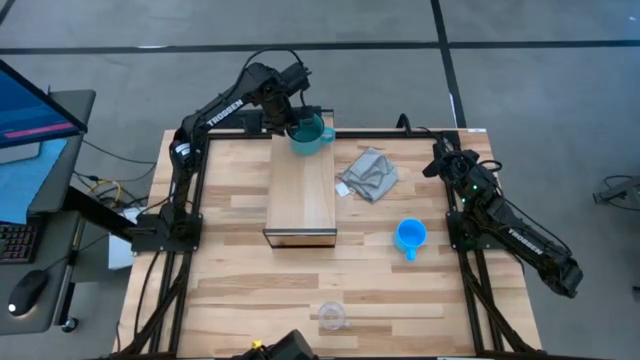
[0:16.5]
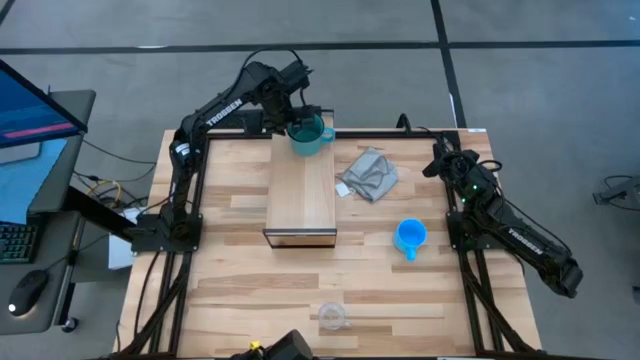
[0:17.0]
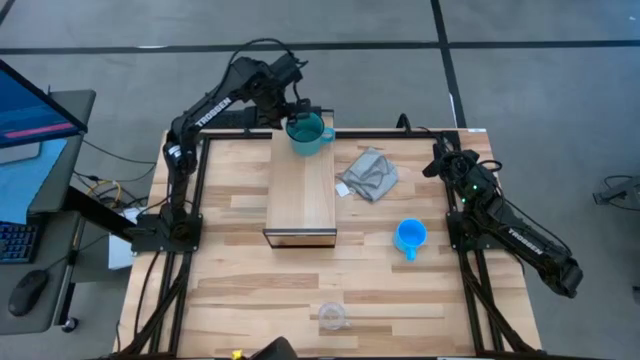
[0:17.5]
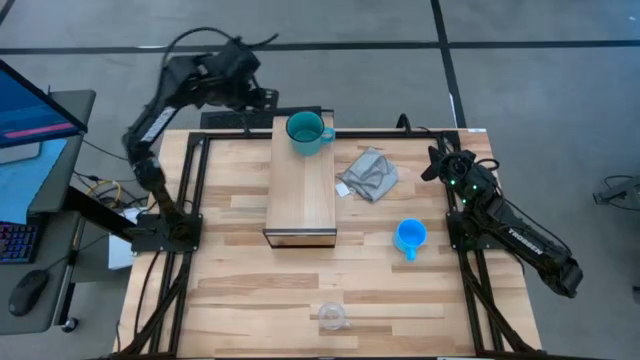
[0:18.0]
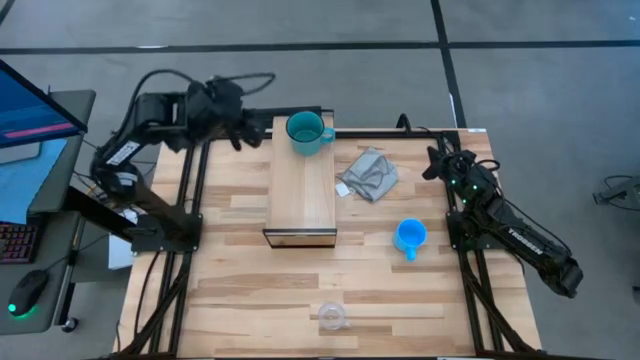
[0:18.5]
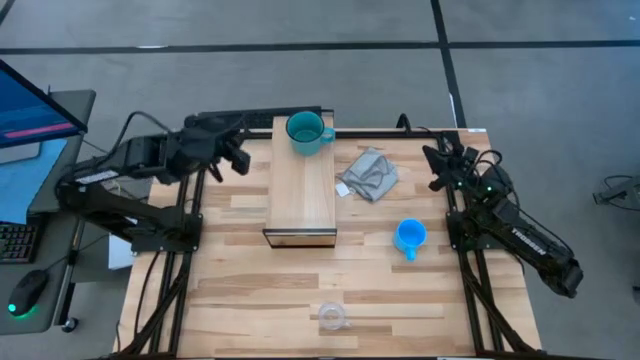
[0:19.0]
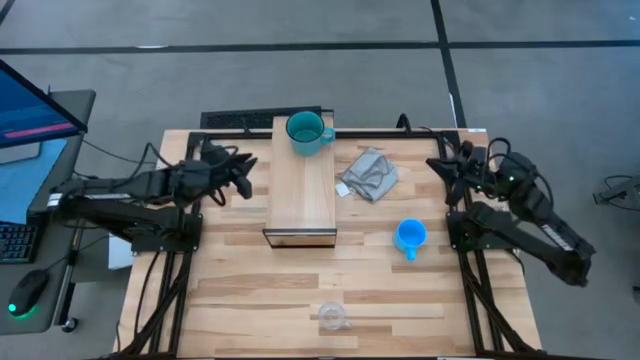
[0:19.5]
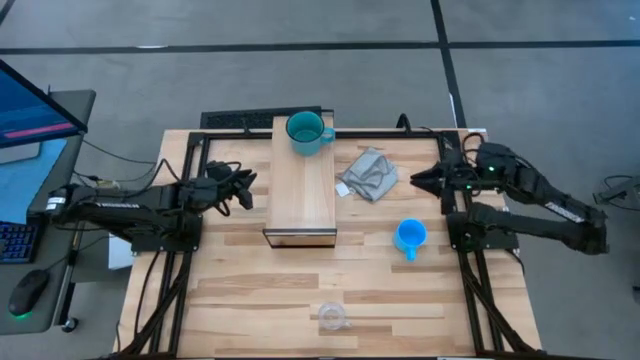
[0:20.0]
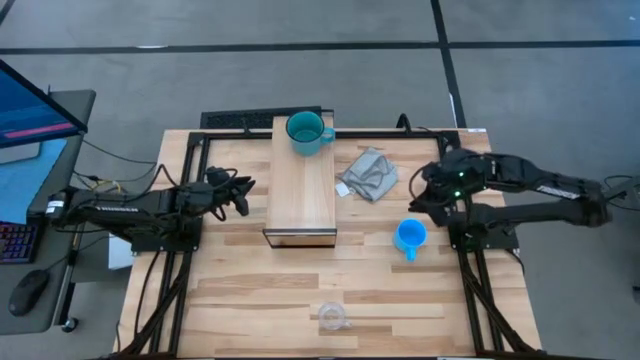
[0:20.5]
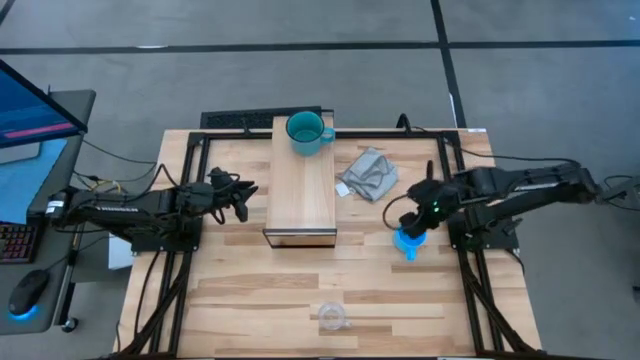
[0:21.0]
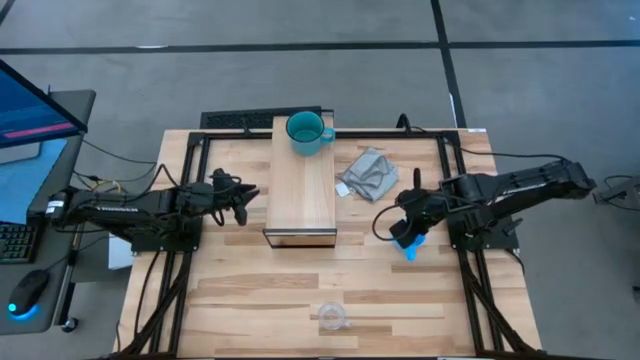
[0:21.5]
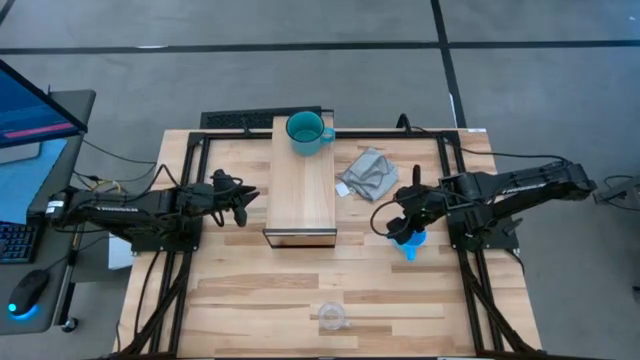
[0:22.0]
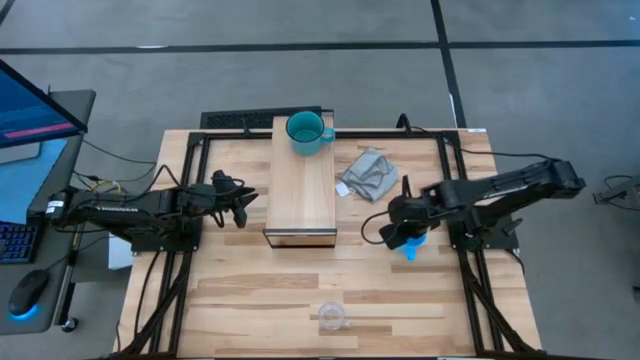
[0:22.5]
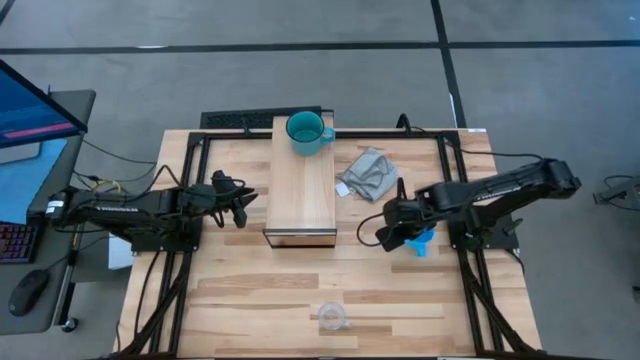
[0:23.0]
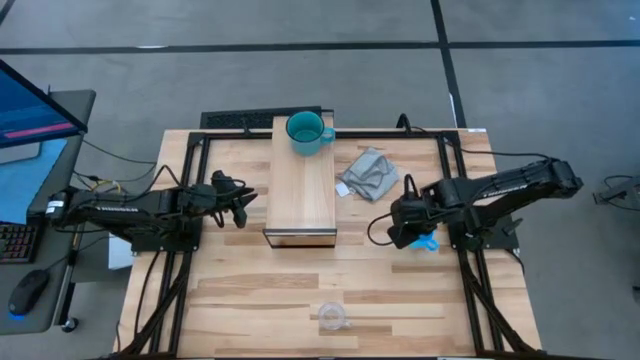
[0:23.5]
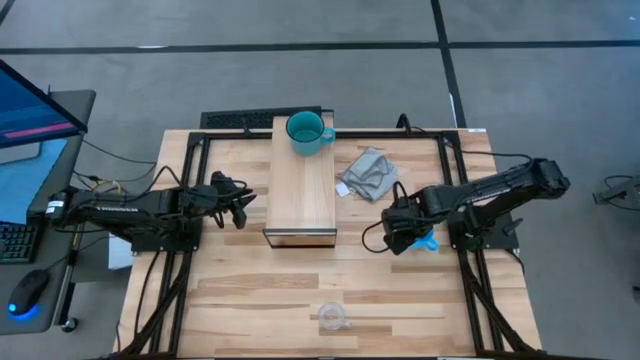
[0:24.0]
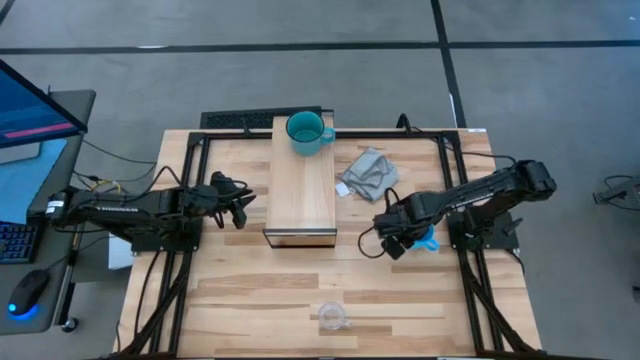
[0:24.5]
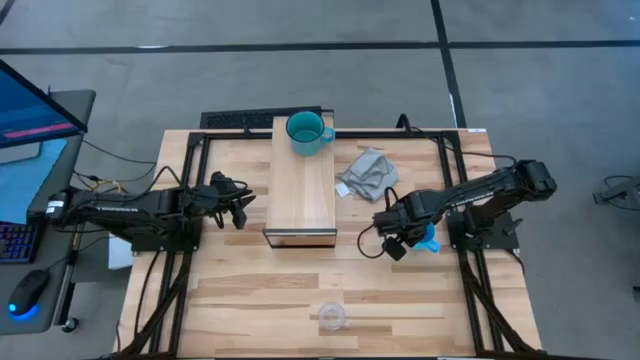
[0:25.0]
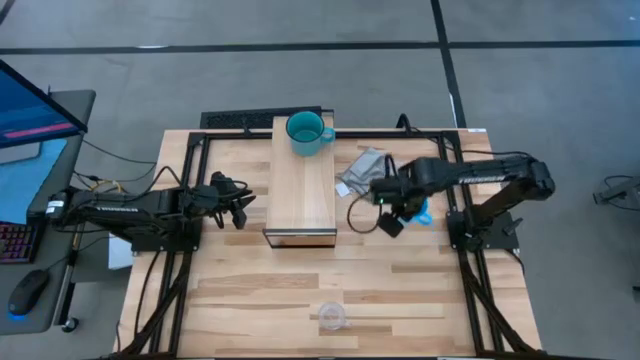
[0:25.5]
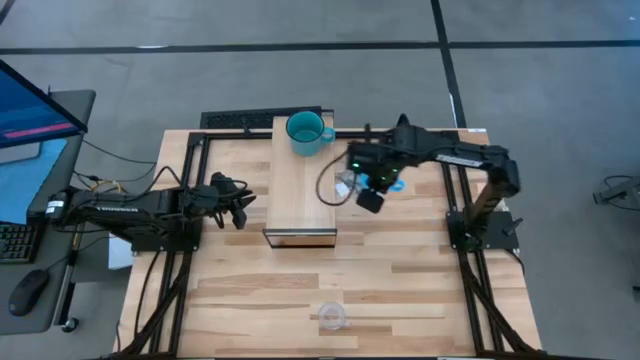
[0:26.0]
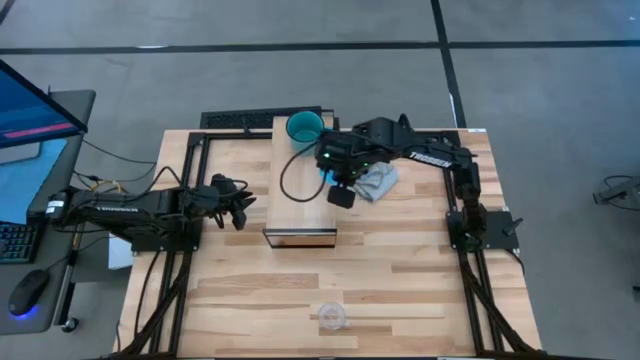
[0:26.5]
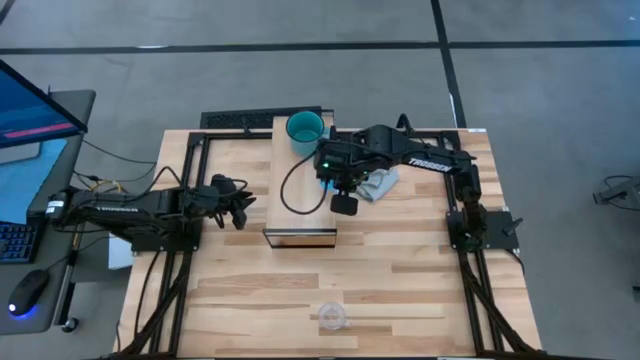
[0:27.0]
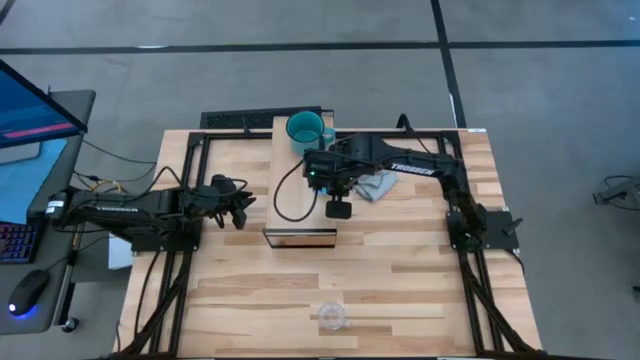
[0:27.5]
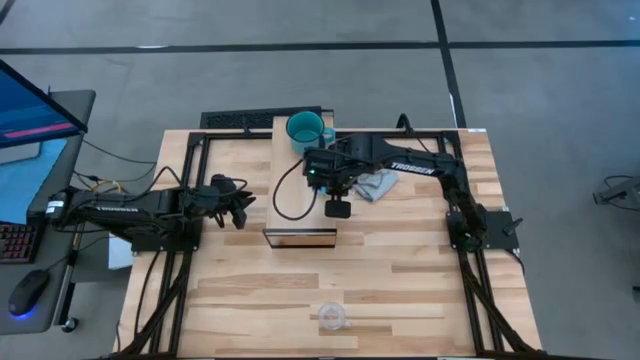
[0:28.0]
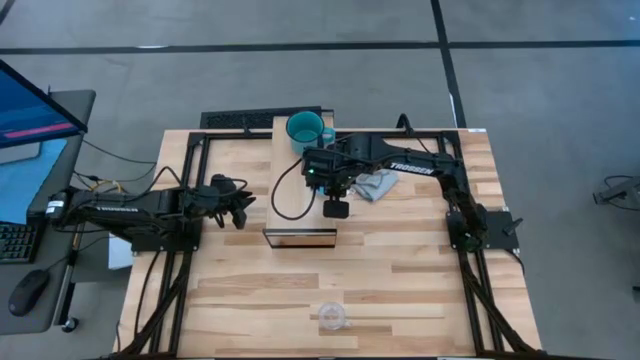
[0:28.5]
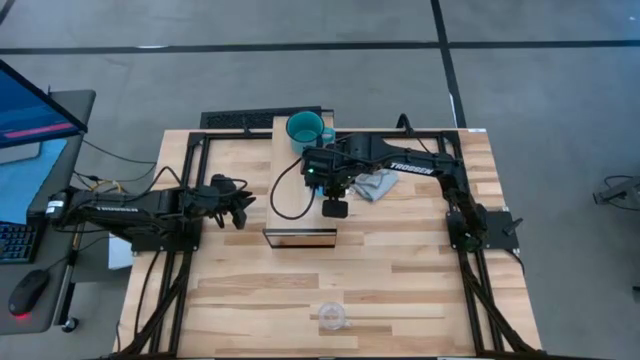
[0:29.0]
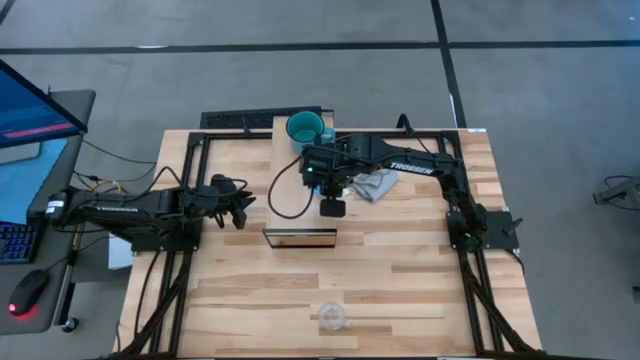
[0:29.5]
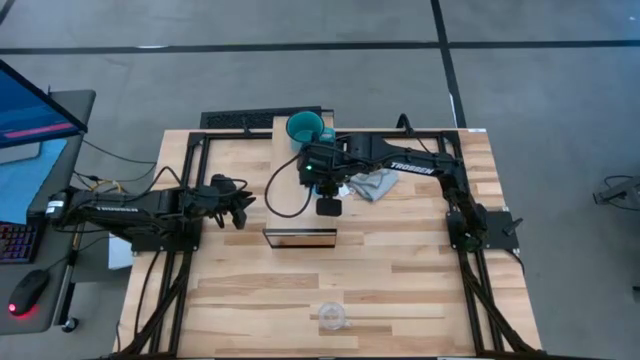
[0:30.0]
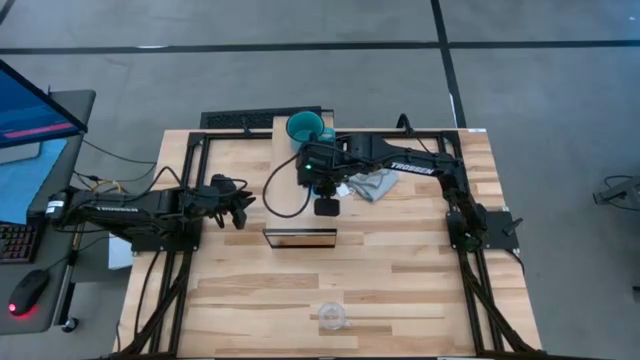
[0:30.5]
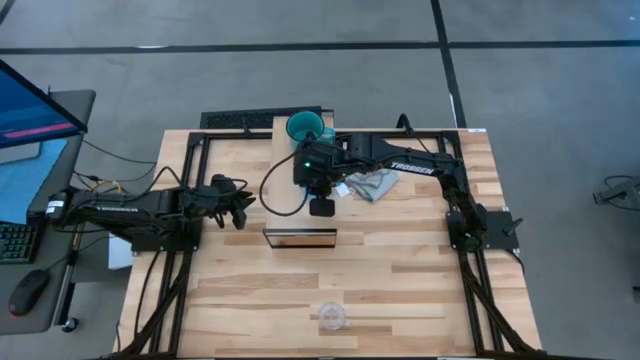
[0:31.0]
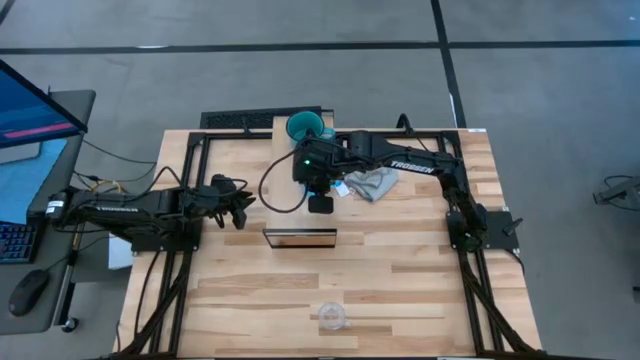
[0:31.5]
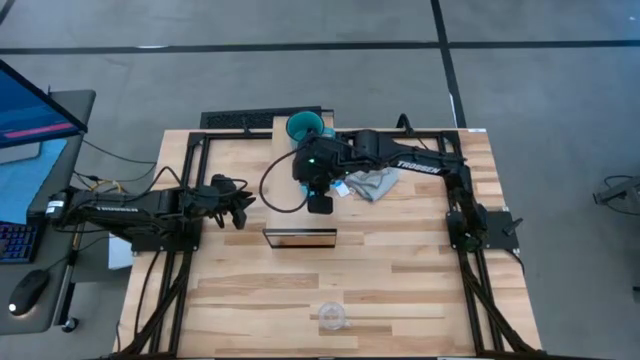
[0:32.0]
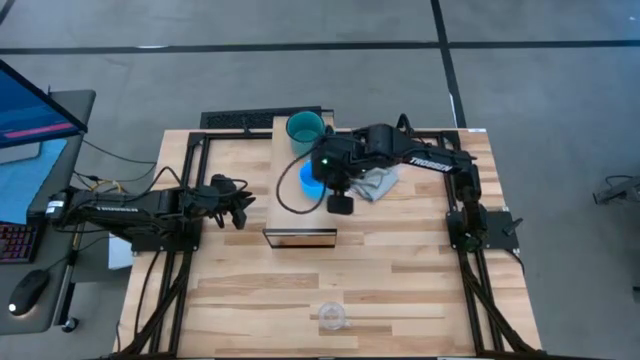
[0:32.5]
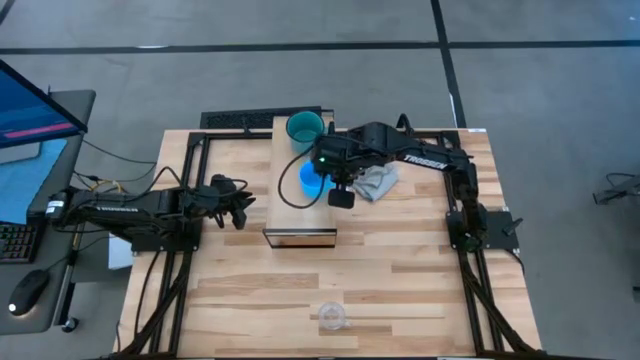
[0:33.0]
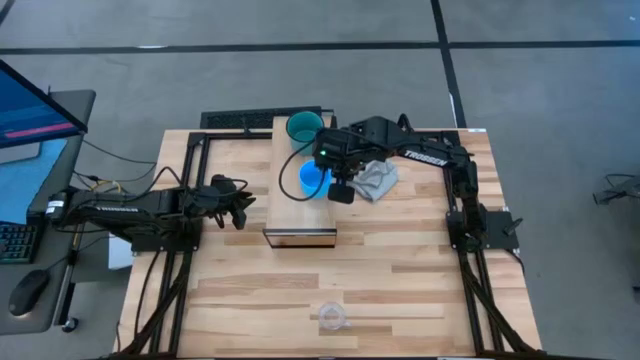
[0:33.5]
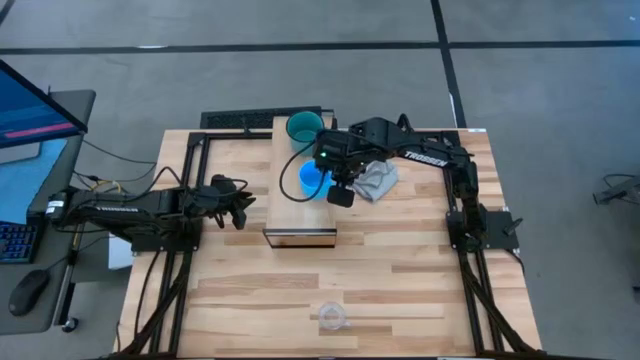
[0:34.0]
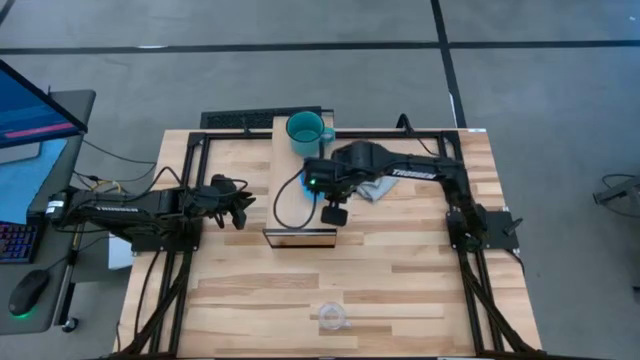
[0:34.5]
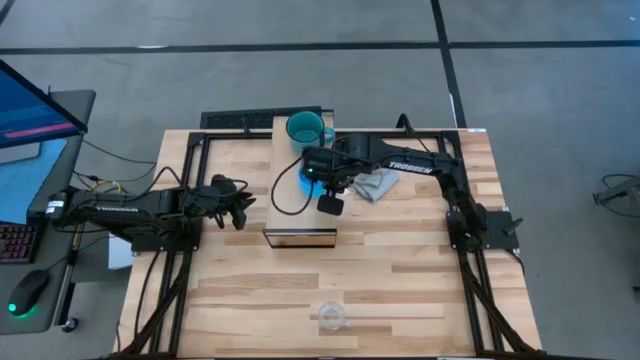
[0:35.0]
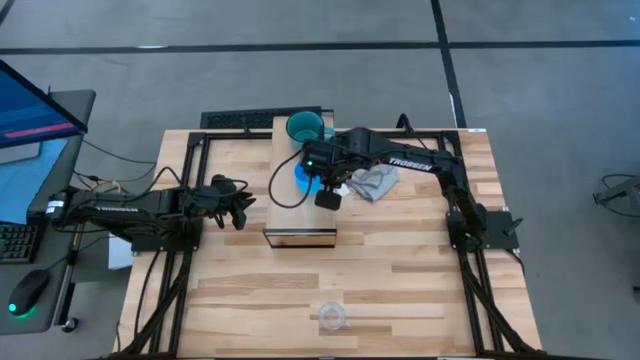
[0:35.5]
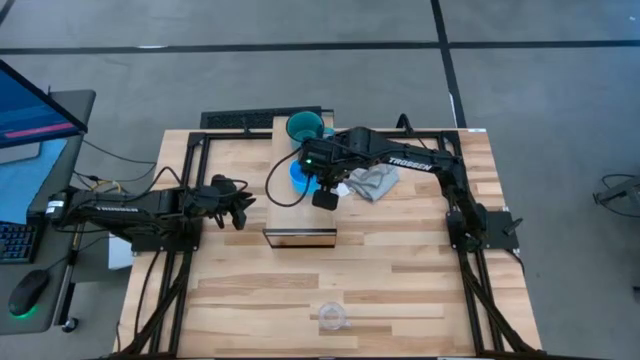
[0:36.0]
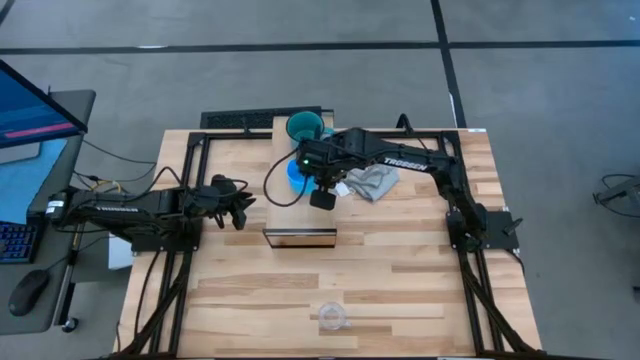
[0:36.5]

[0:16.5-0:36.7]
Task: Stack small to large cups/mugs on shelf
Put the blue mug on the shelf
